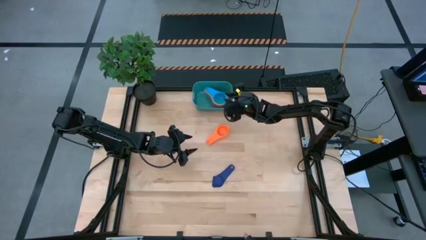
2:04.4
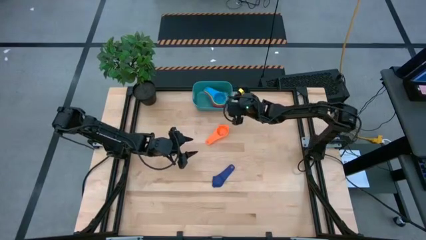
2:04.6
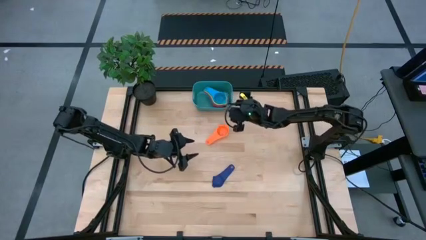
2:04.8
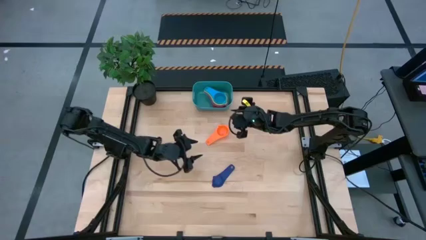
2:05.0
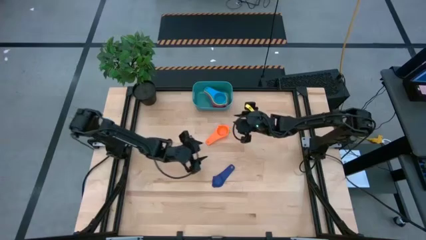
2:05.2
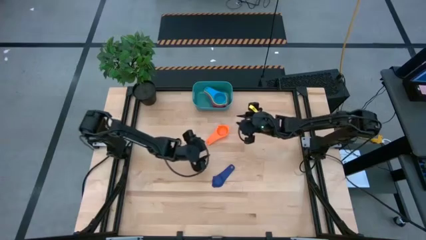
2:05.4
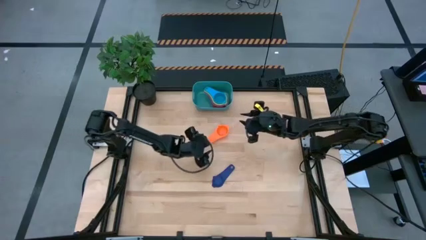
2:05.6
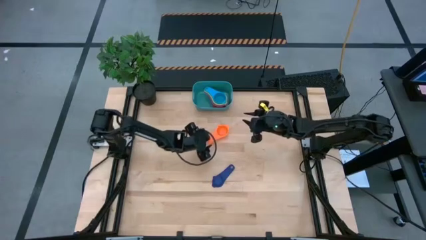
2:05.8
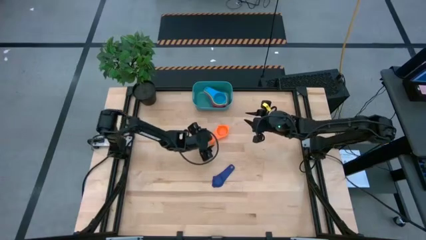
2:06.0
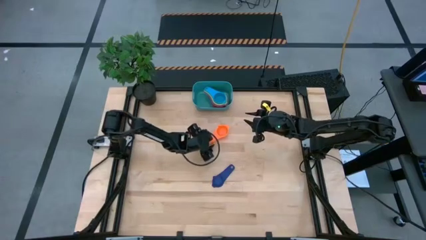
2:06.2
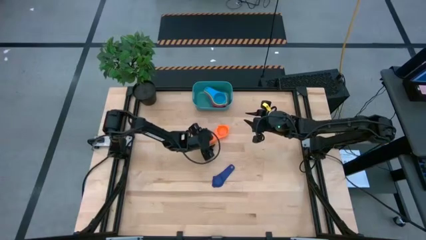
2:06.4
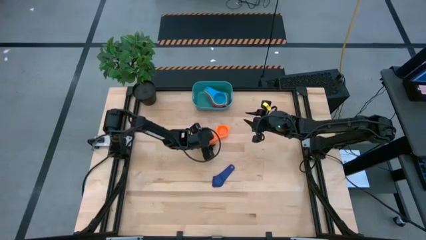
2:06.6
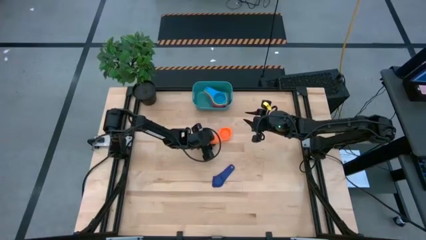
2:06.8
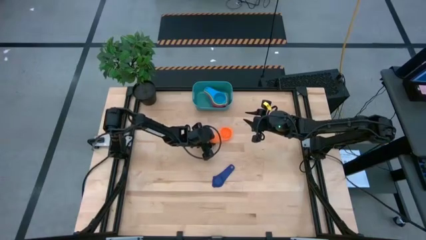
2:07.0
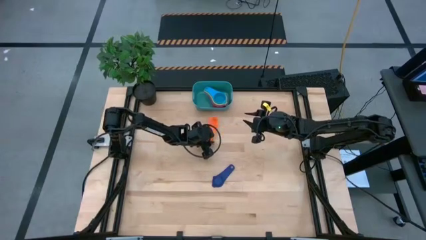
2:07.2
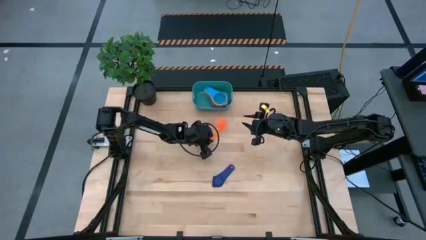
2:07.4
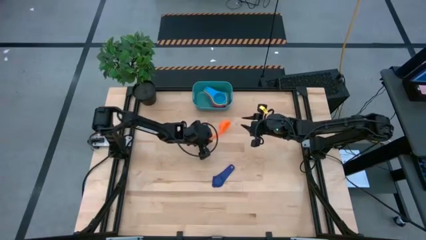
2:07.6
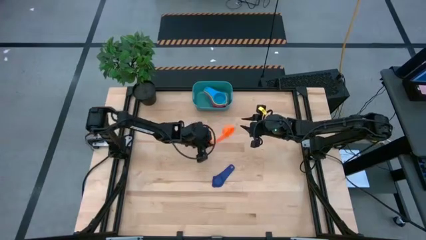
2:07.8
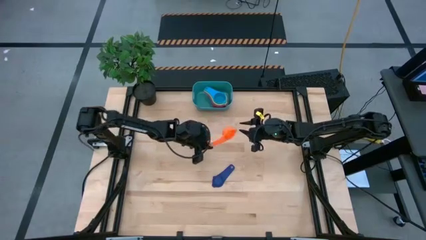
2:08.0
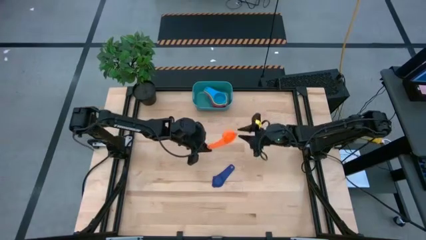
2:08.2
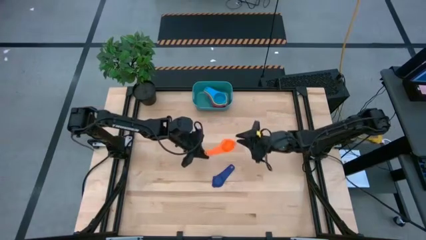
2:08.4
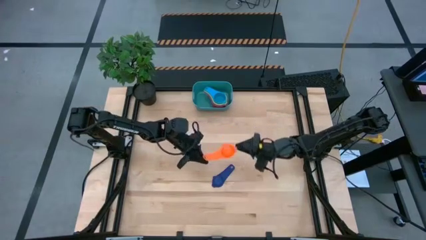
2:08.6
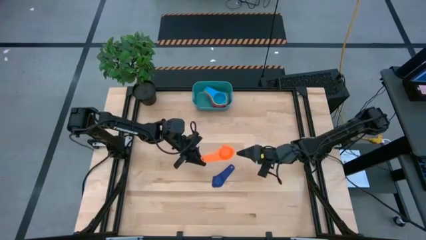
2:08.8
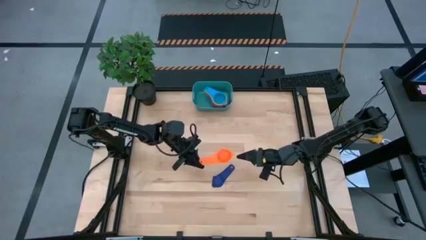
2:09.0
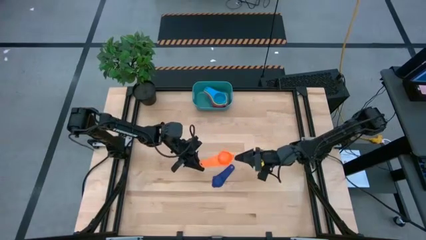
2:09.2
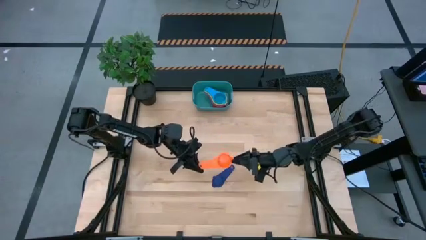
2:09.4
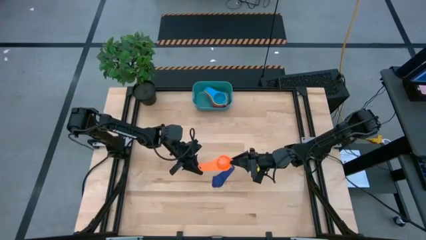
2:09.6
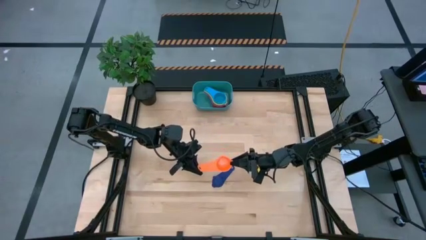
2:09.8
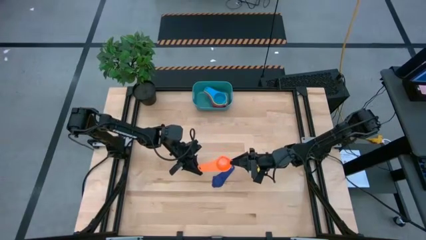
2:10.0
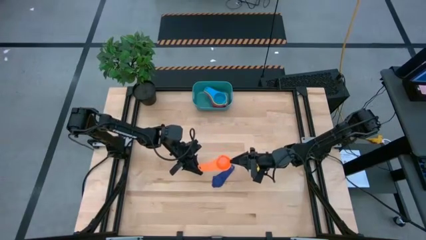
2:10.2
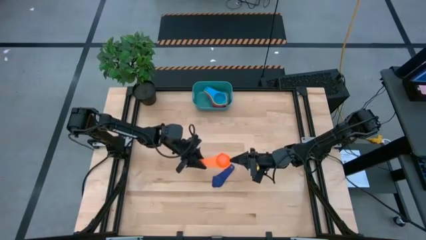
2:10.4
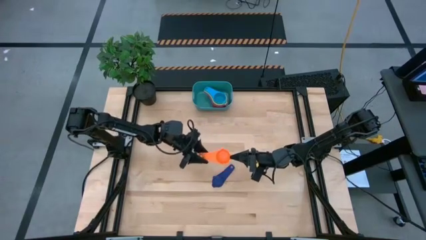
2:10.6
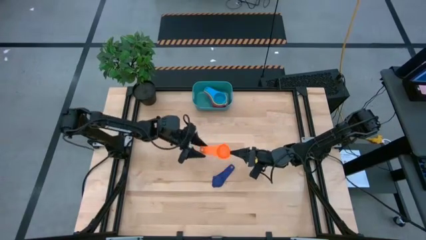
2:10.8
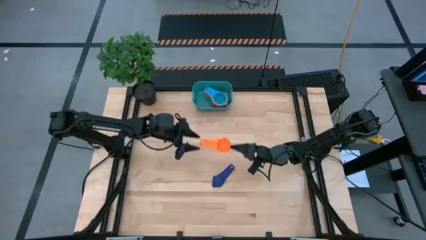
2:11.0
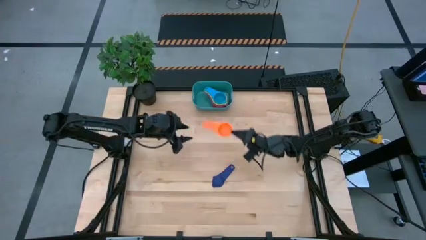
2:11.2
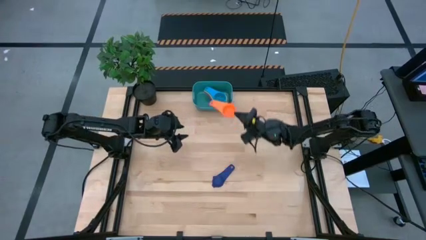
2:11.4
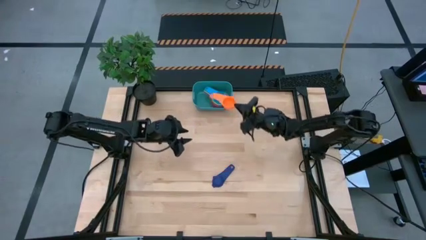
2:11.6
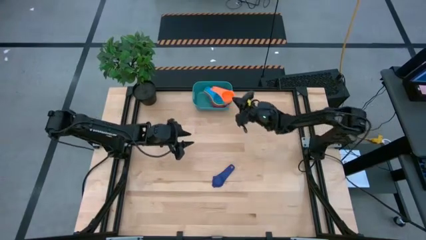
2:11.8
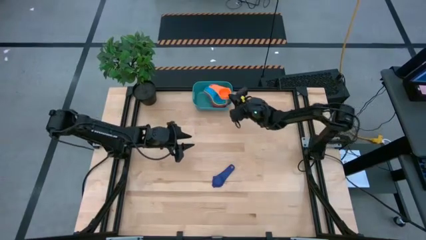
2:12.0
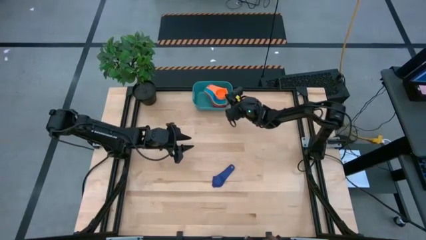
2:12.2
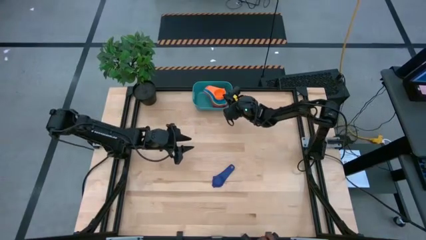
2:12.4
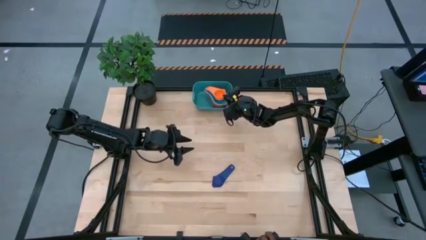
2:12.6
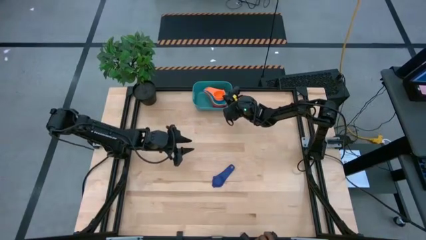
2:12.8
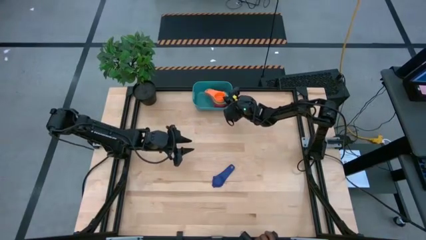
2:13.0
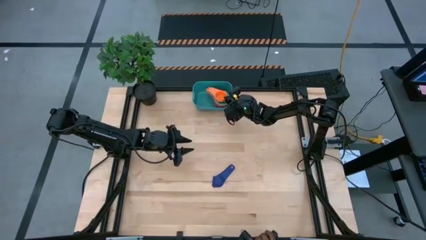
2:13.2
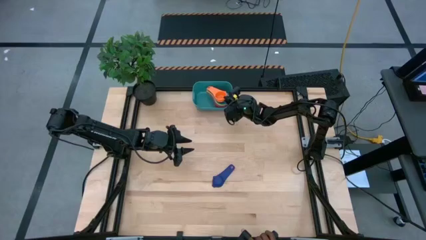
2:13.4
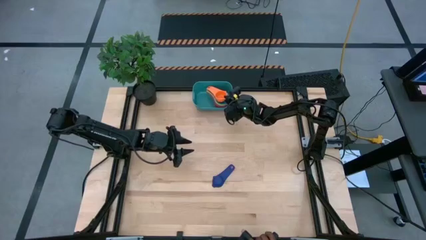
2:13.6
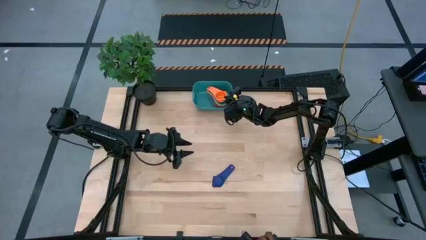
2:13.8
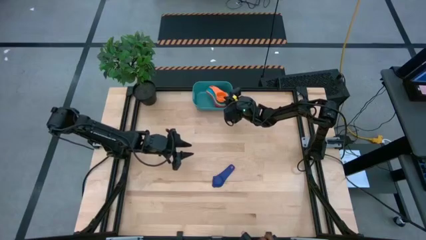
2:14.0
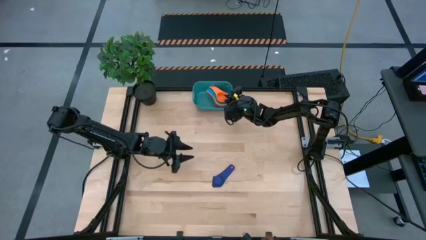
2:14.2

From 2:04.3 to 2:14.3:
Task: Nest measuring cups in basket
Stack the orange measuring cup on top of the light blue measuring cup in the blue bin
